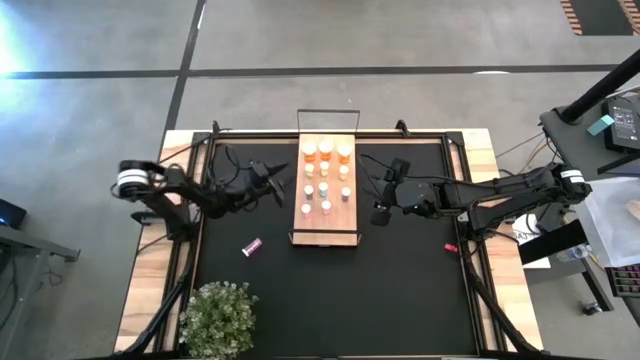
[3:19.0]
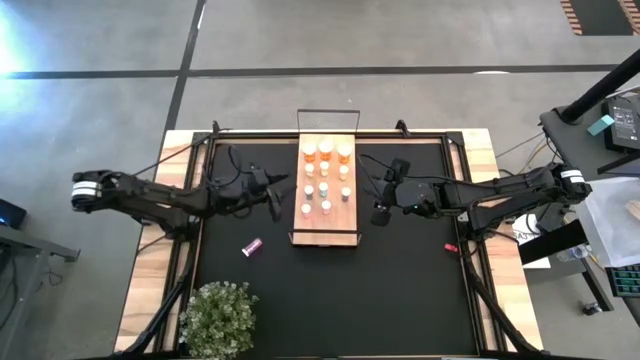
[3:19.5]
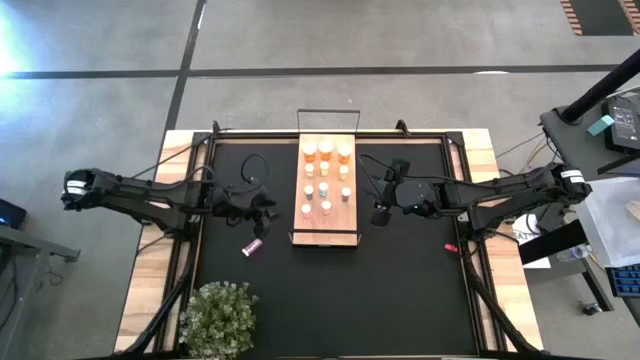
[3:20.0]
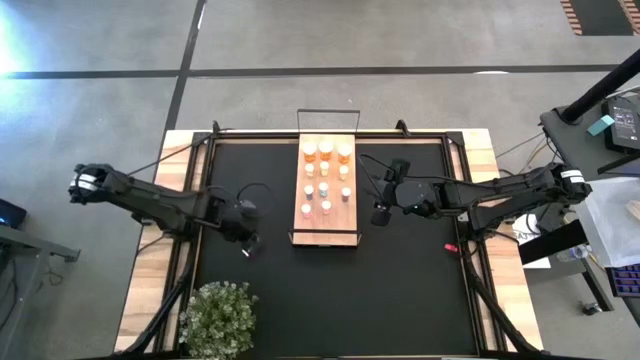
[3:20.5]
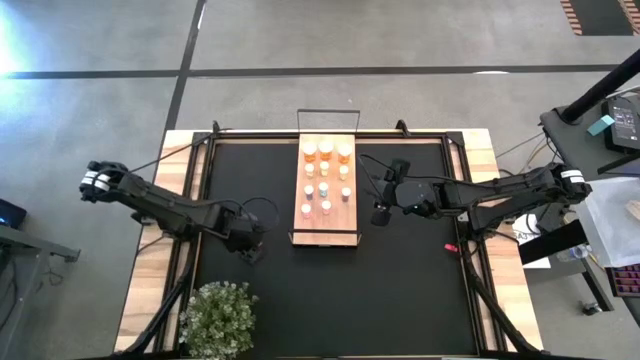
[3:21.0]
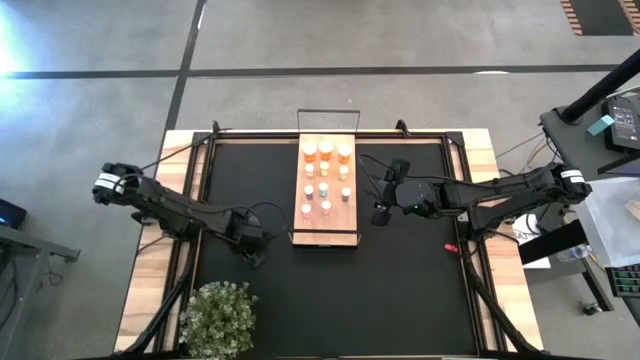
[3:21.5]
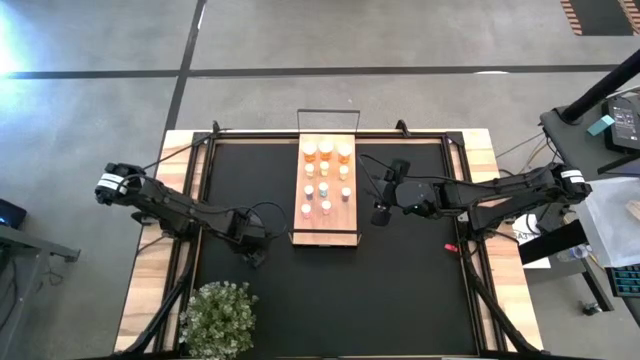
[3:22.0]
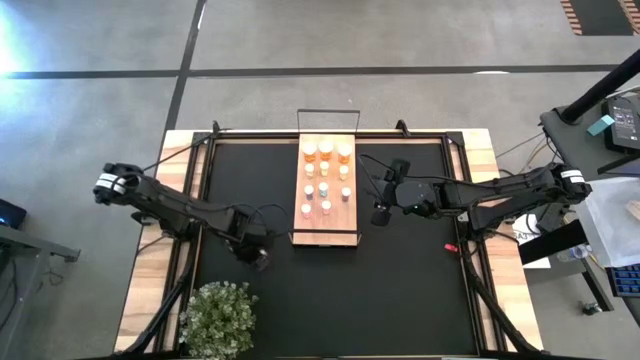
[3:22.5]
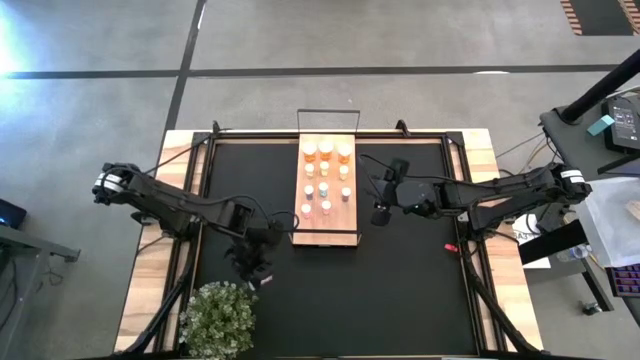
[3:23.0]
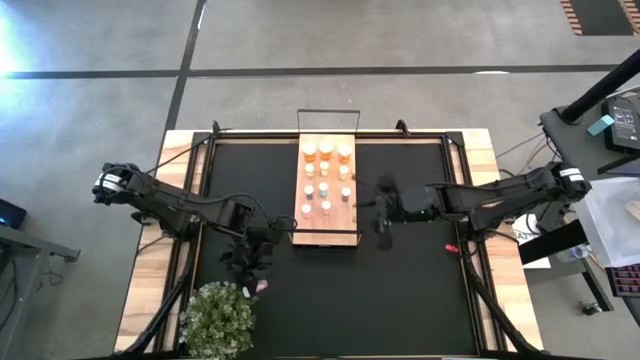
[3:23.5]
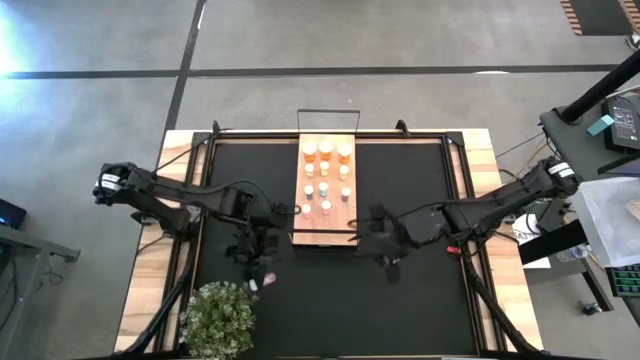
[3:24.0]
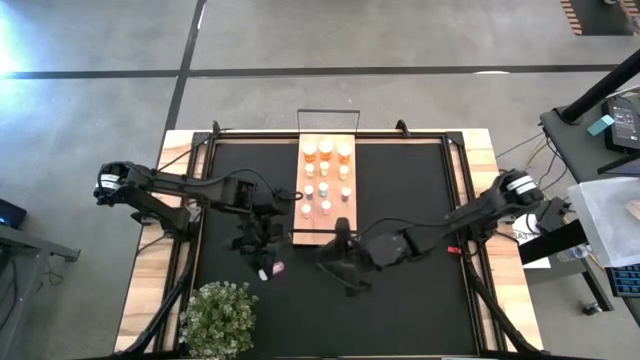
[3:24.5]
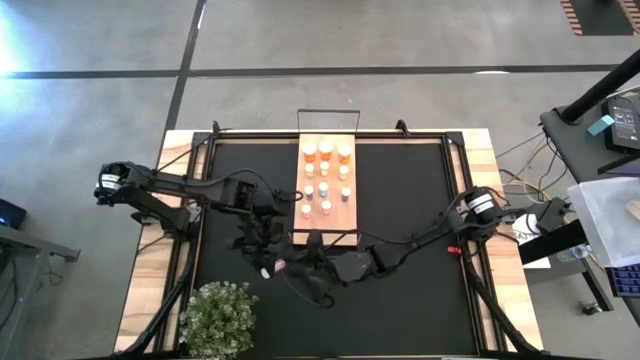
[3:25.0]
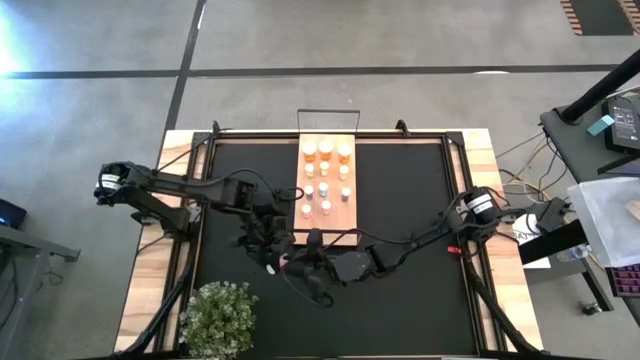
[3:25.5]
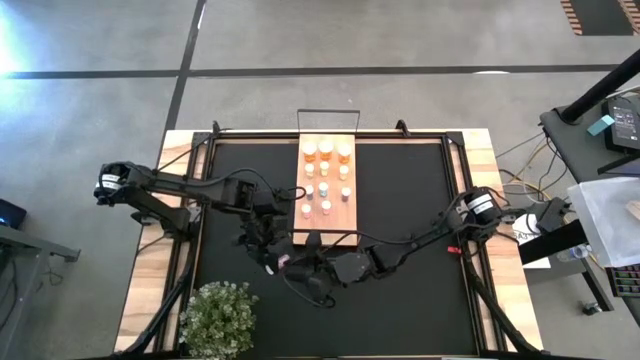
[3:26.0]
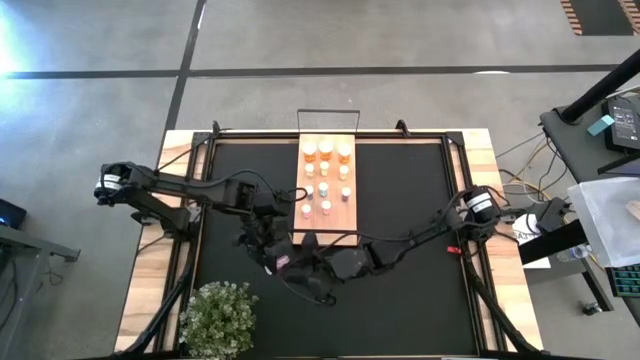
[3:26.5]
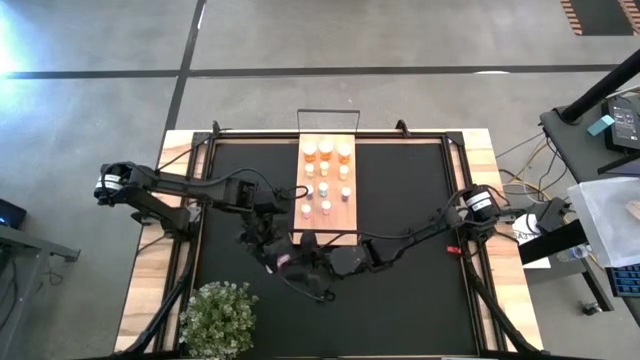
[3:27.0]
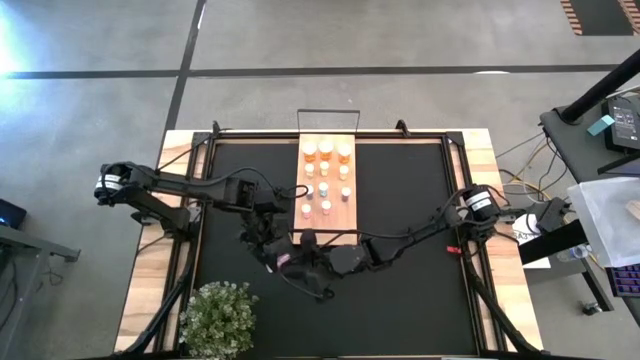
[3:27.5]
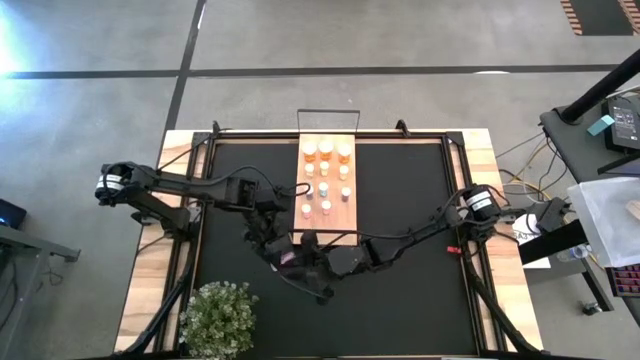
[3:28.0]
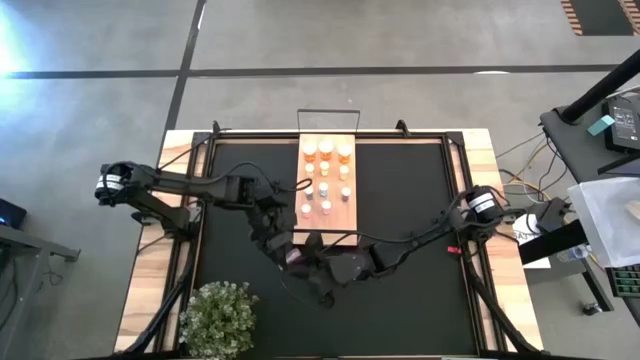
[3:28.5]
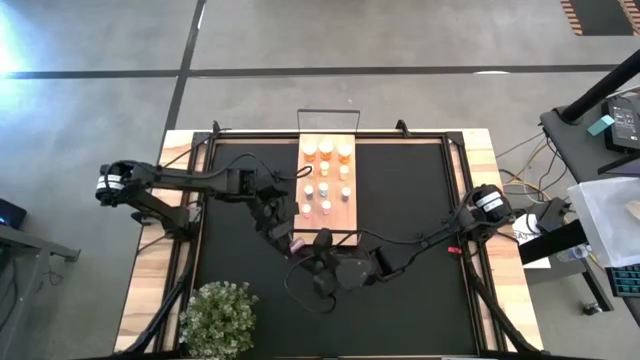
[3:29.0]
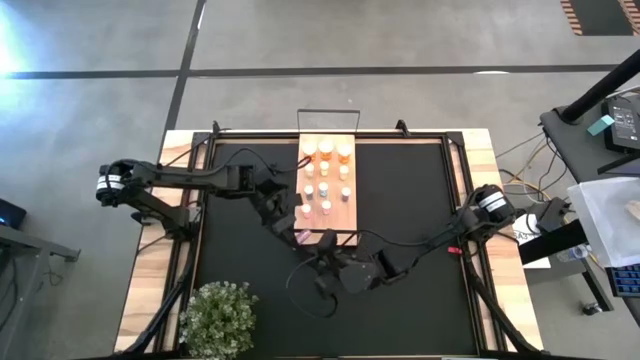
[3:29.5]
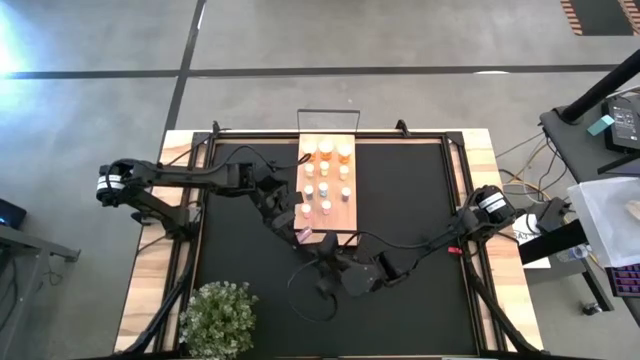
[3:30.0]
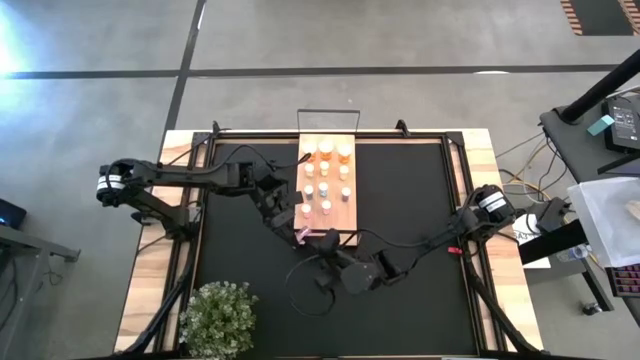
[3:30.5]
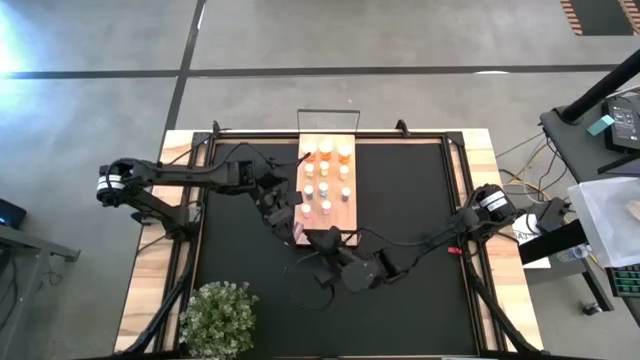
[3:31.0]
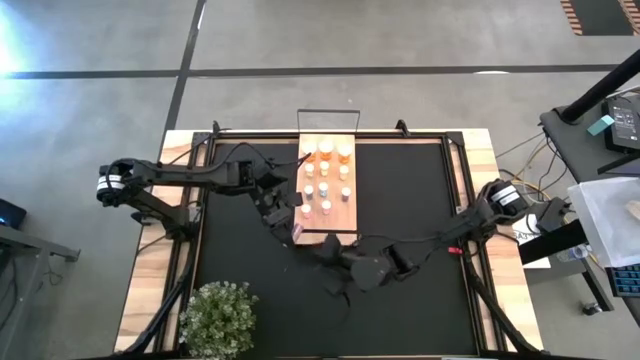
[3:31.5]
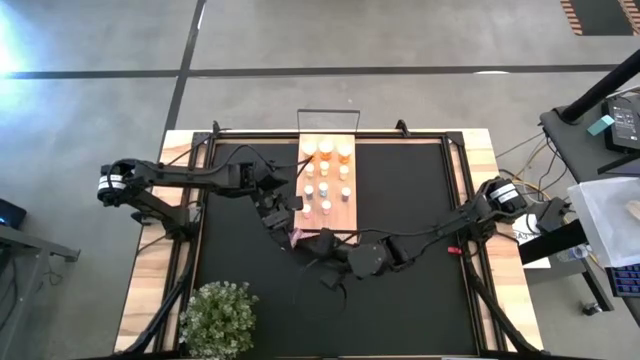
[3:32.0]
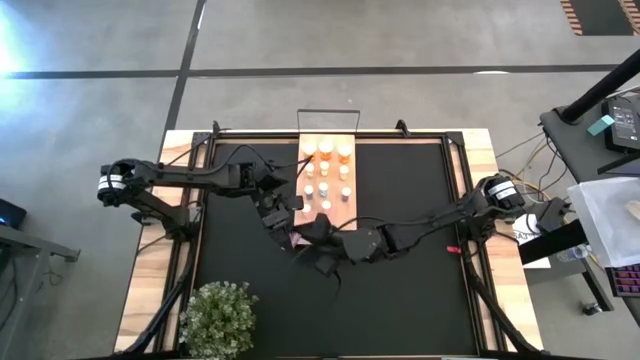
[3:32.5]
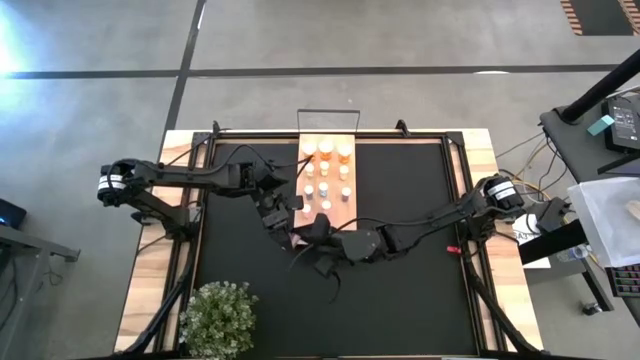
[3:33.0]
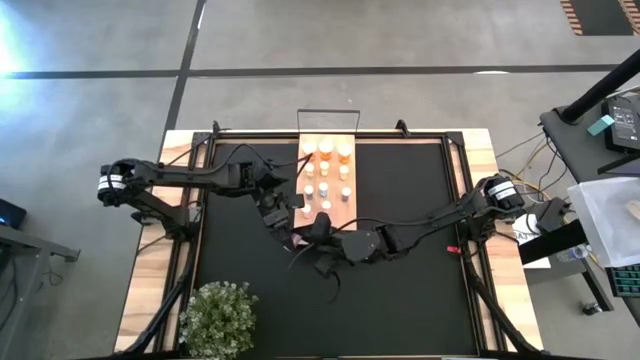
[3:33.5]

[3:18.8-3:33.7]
Task: Pick and place medicine bottles onto shelf by color
Put the pink medicine bottle on the shelf aligned with the other pink medicine bottles

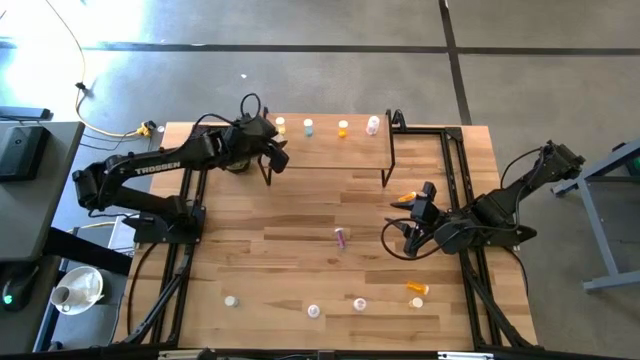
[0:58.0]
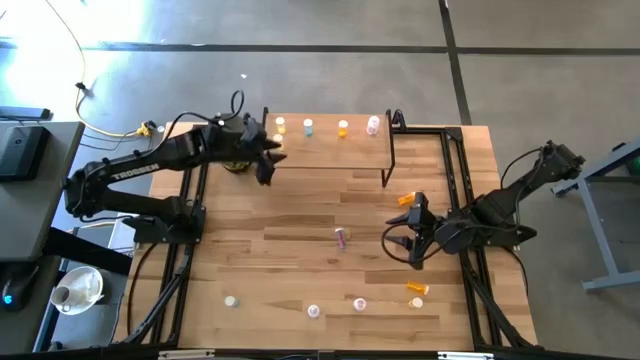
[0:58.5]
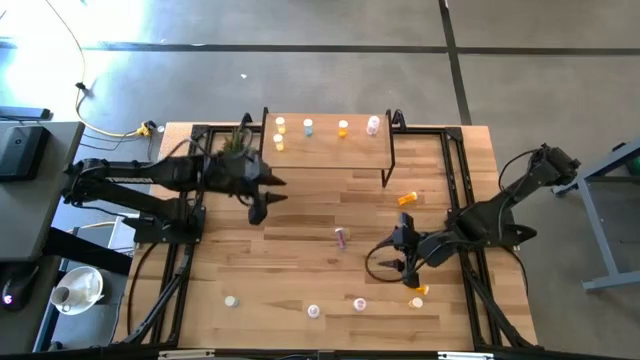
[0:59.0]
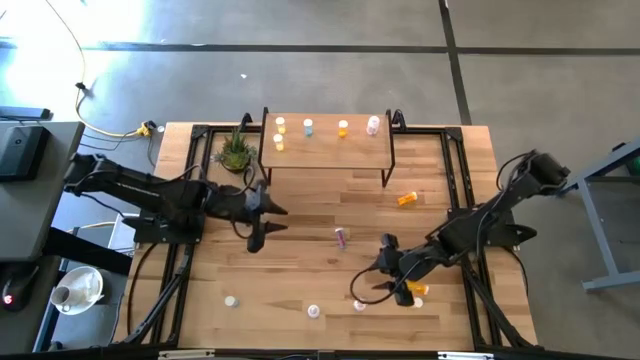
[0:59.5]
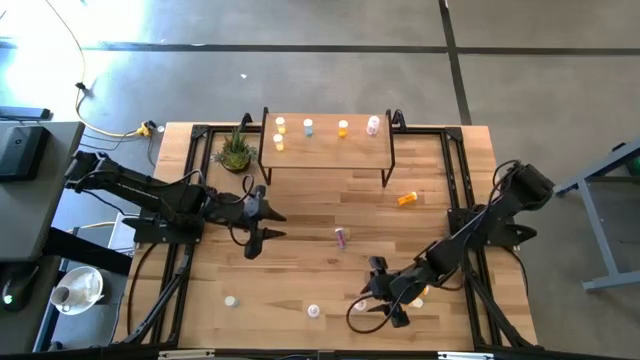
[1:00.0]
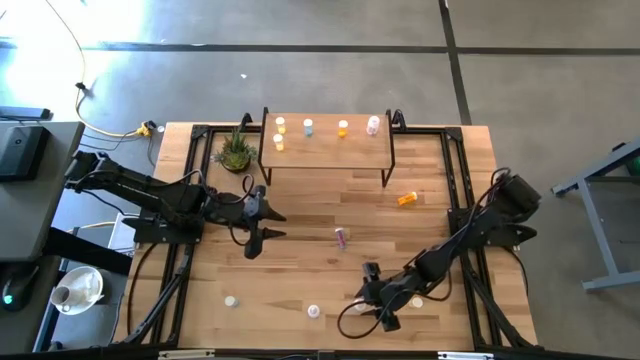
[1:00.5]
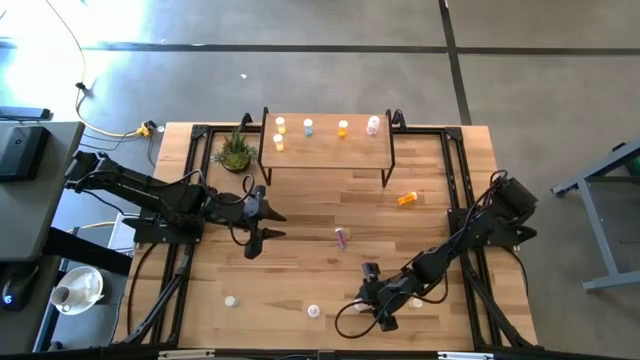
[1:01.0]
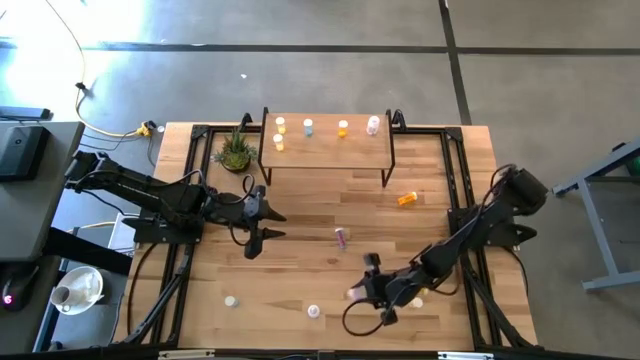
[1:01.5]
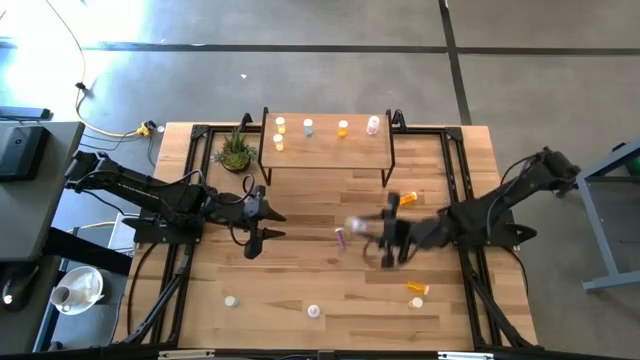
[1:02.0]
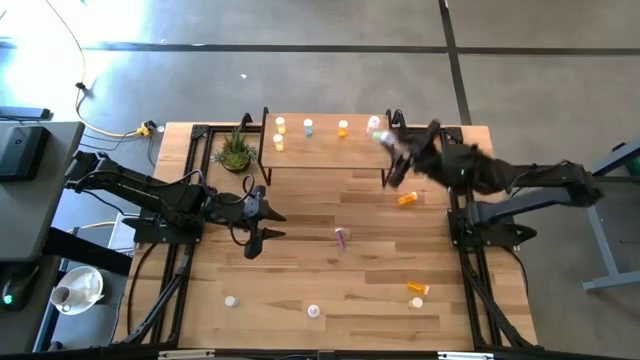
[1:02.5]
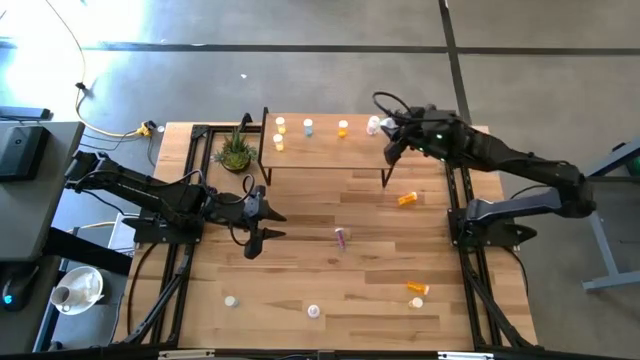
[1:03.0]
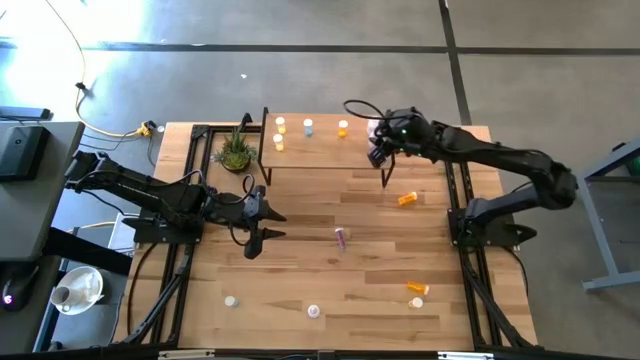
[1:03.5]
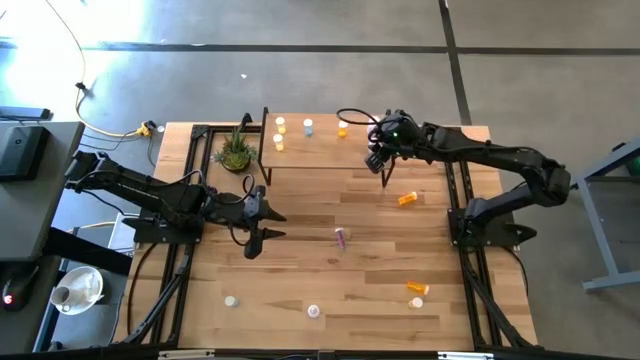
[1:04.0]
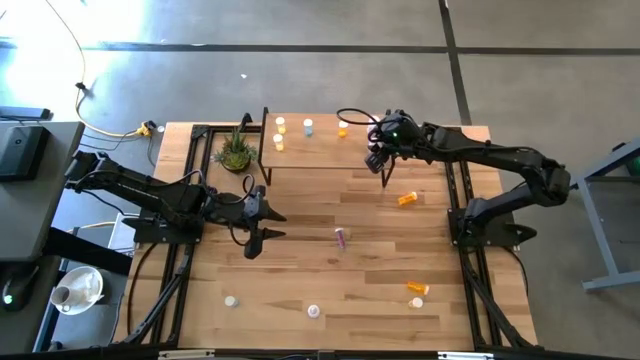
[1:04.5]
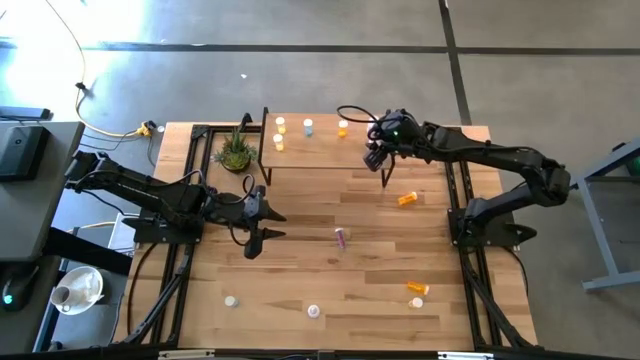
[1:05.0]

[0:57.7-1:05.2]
Task: Pick and place medicine bottles onto shelf by color
Put the right white pill bottle on the shelf aligned with the other white pill bottle
